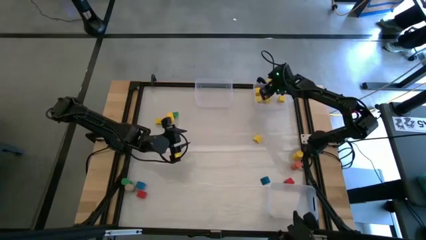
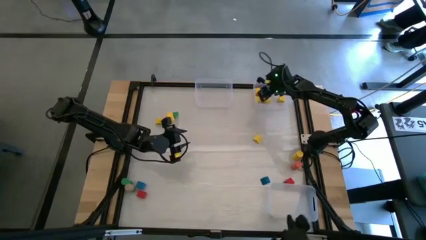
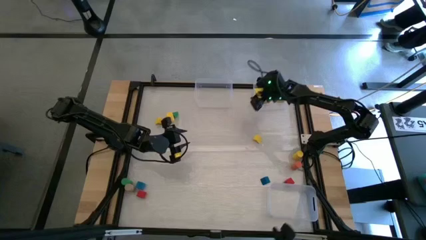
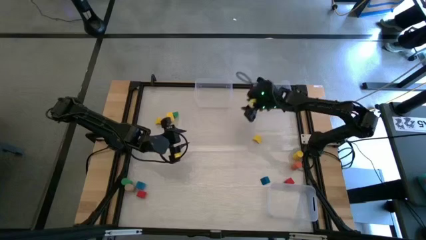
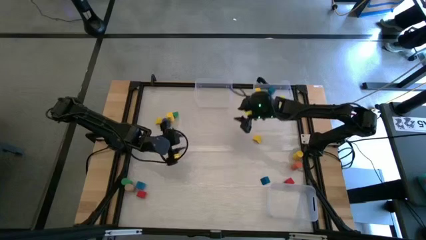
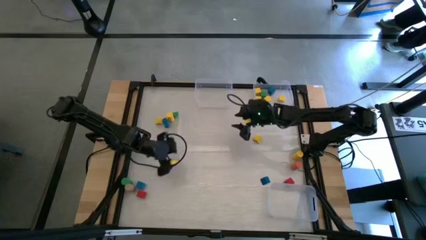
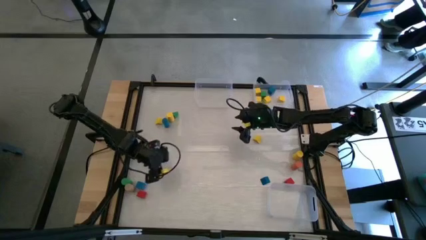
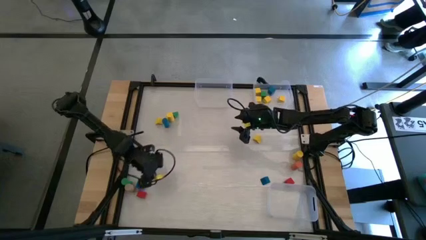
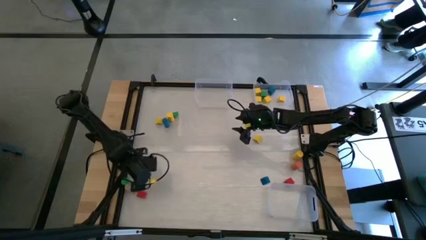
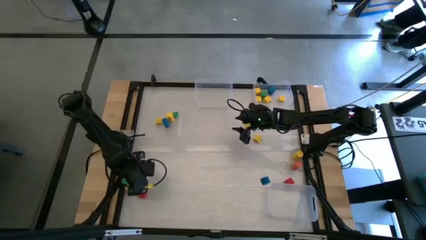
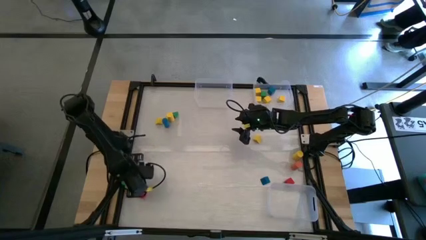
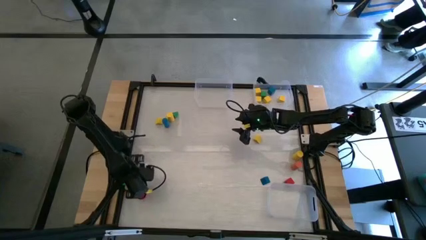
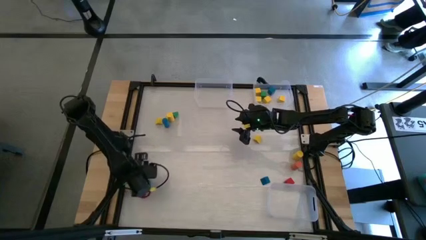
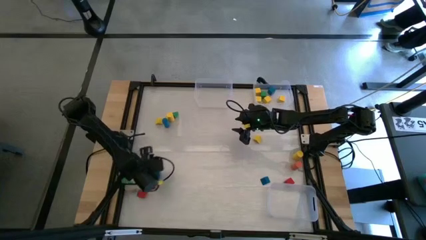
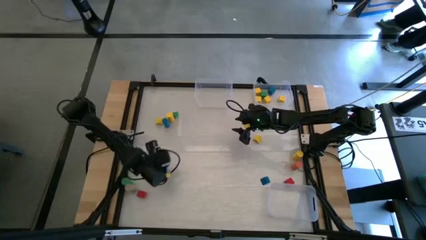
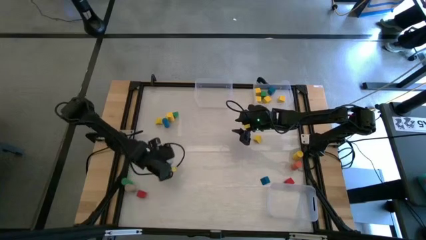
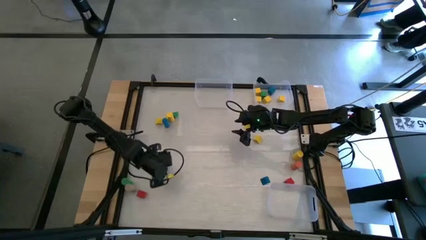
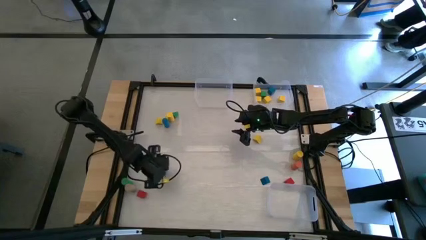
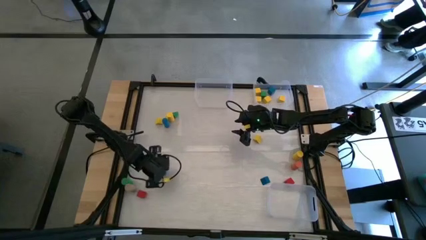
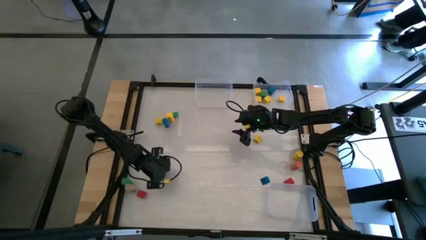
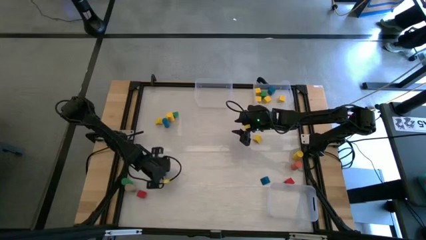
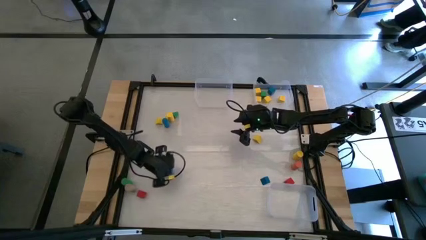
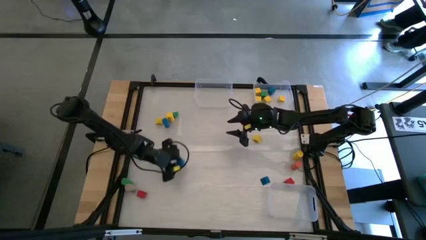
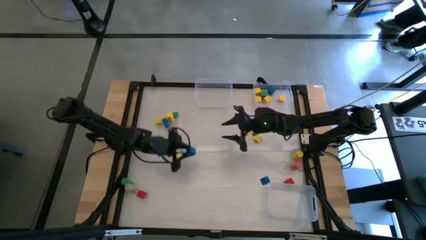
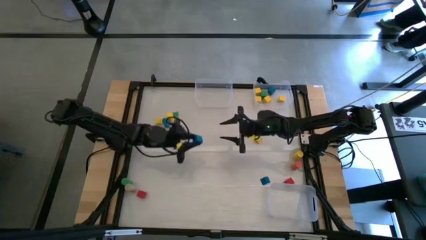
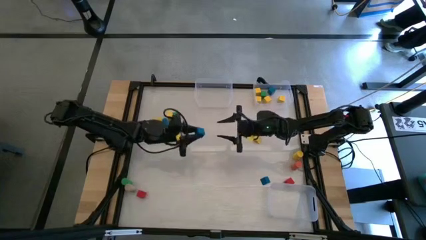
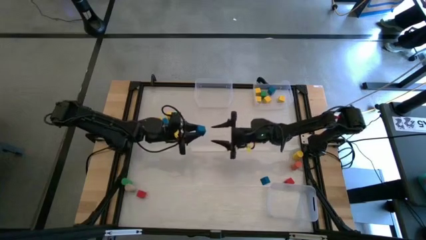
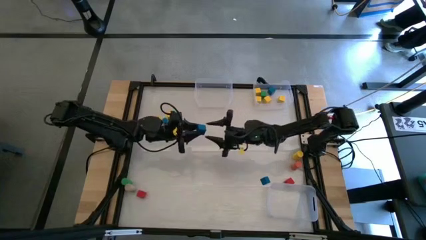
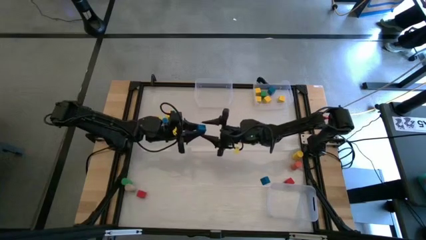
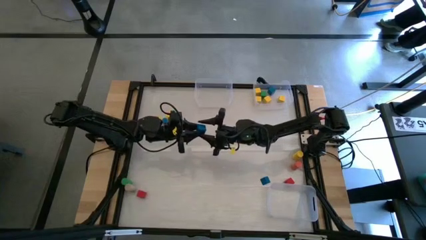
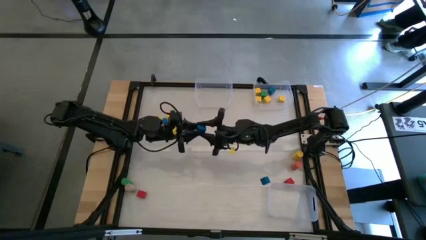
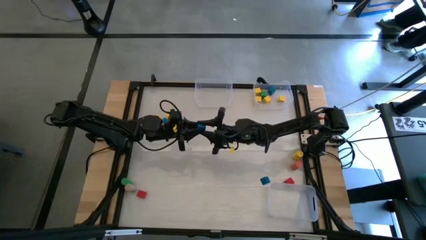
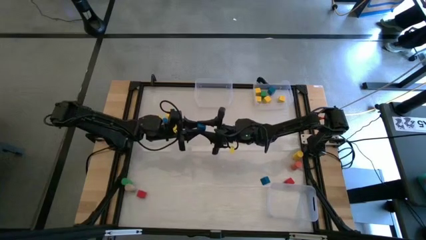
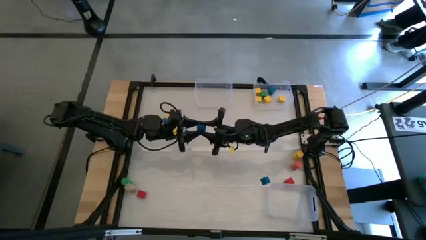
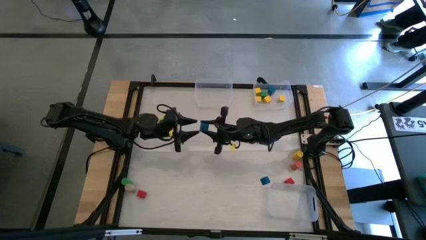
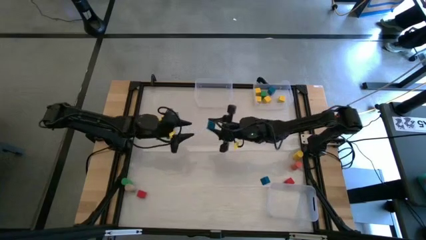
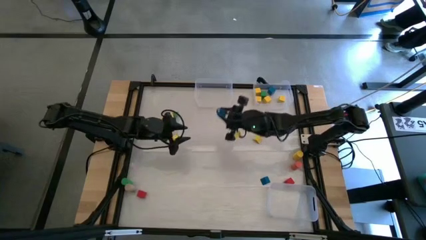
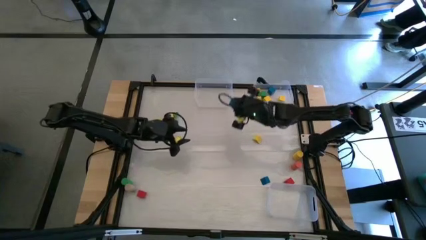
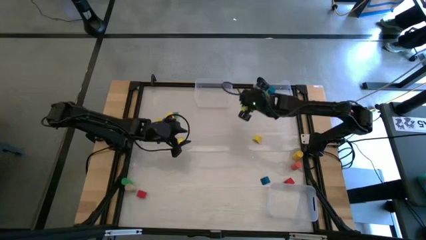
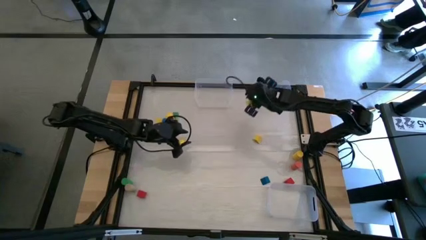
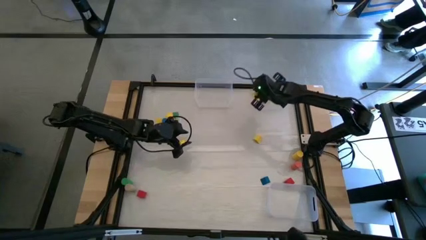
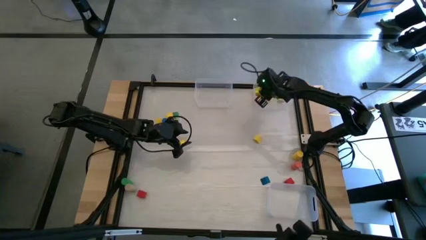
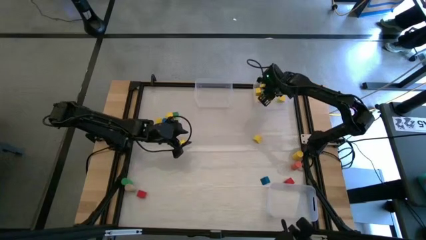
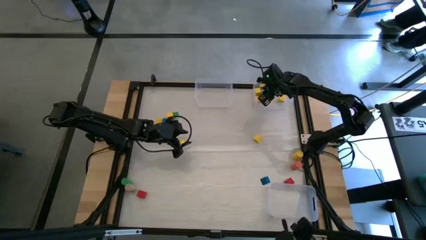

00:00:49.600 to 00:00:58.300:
Task: Sort blocks by size
Put the blue square block into the top right transparent bin

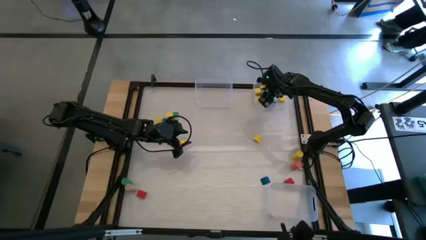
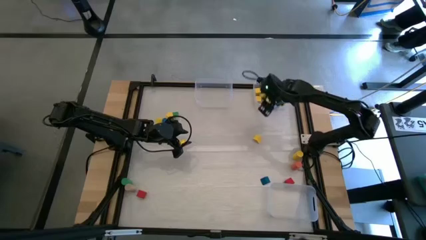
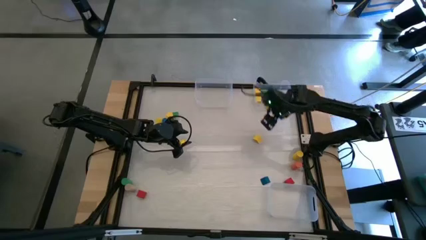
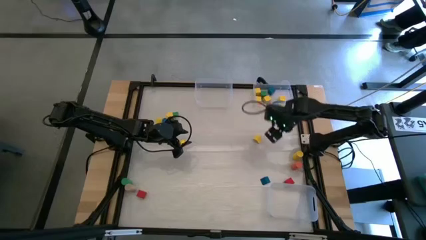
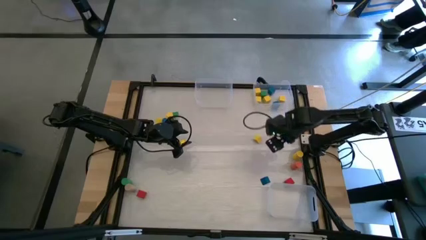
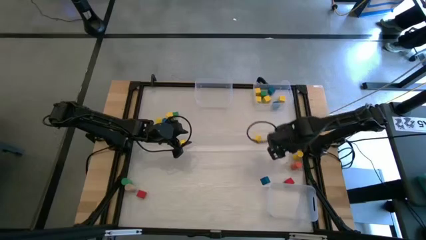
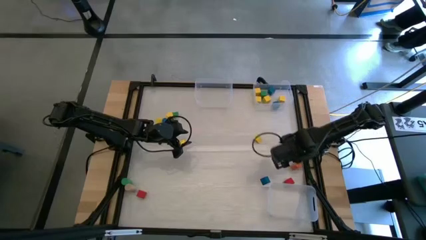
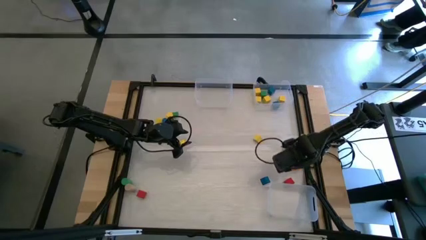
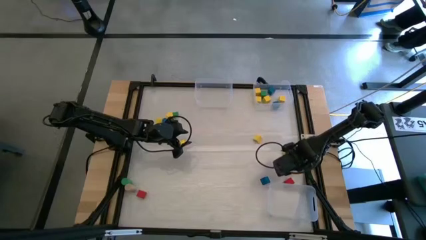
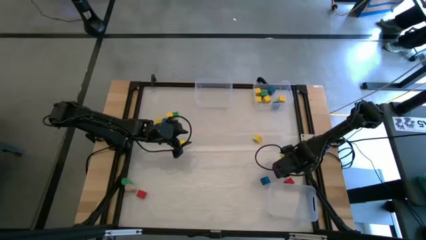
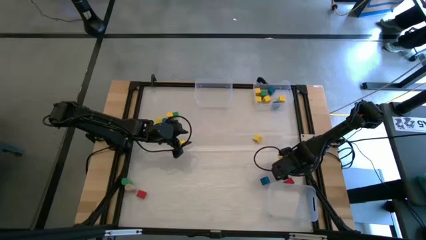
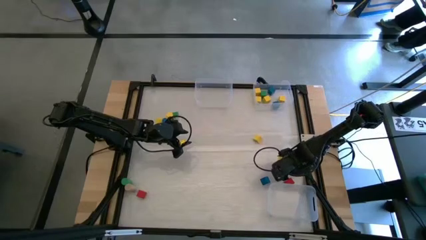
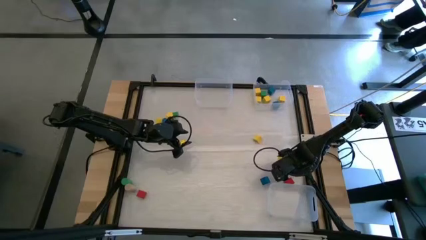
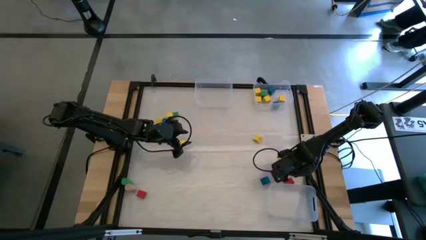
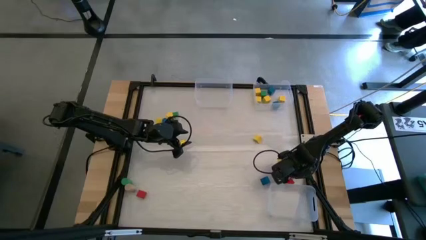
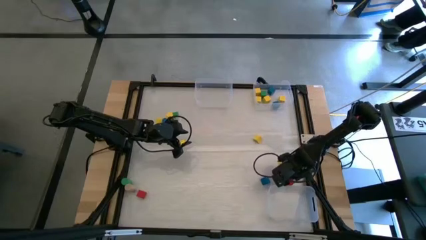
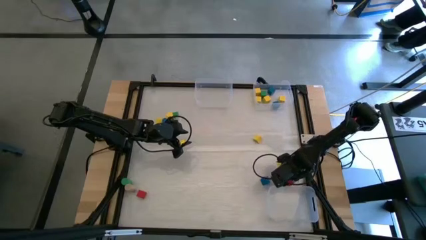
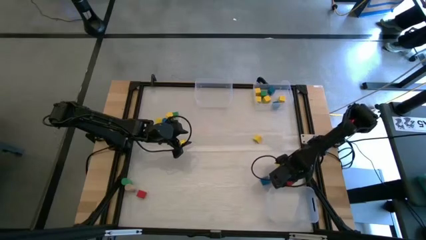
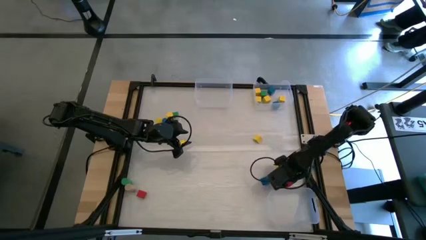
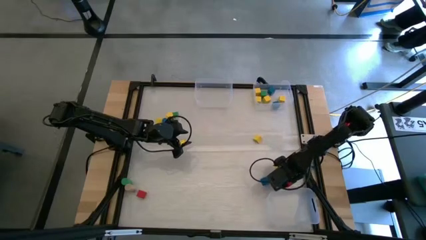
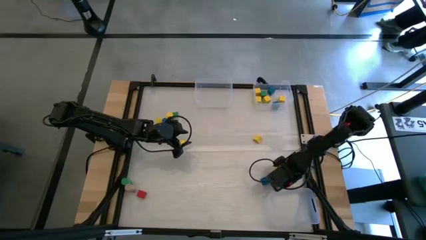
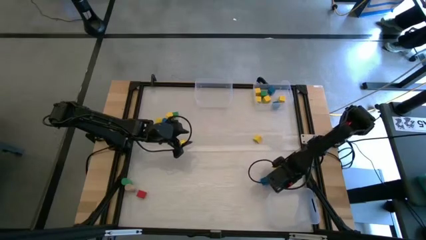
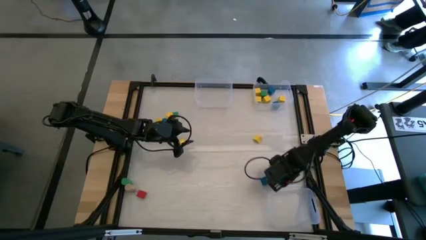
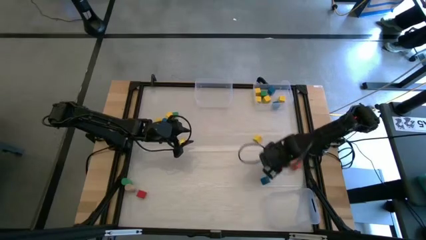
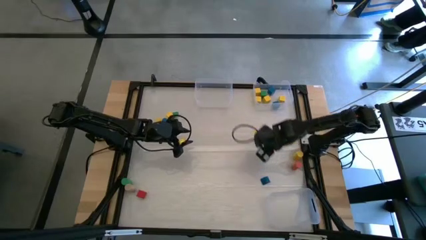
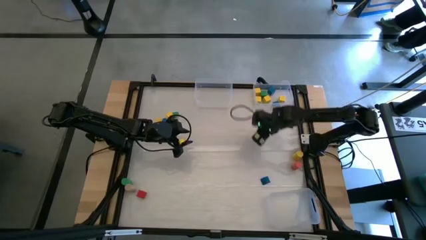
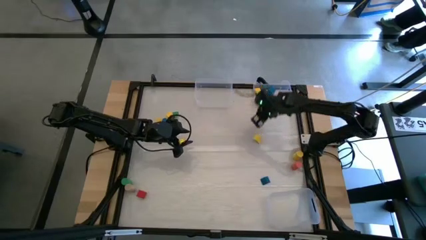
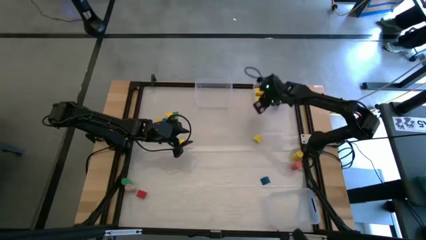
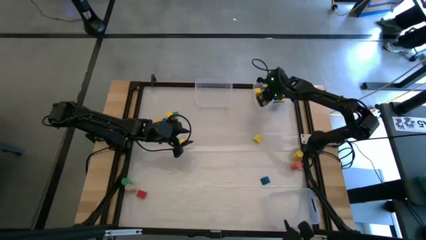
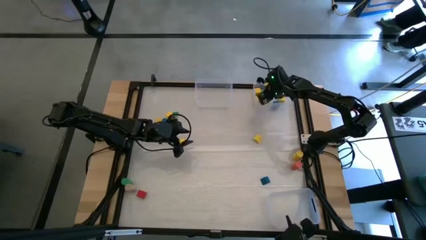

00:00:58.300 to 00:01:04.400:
Put the red square block into the top right transparent bin
